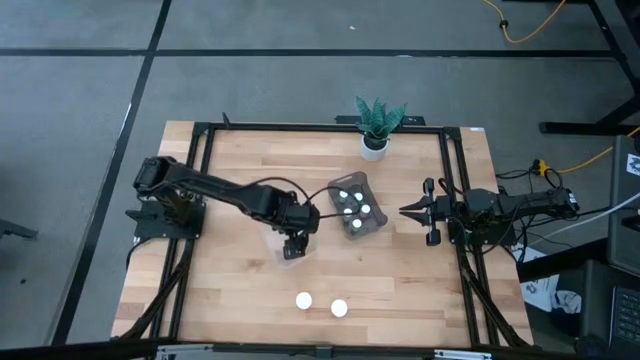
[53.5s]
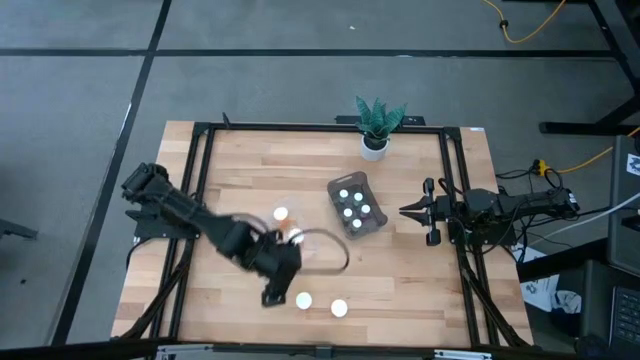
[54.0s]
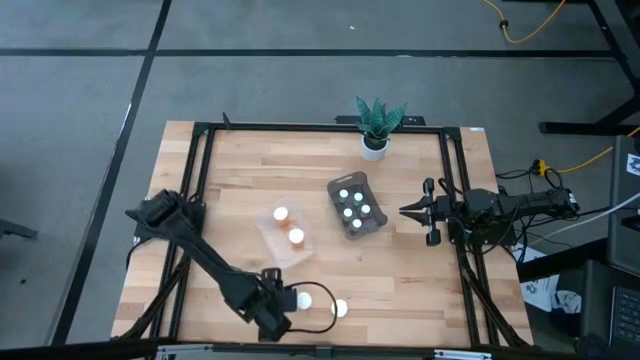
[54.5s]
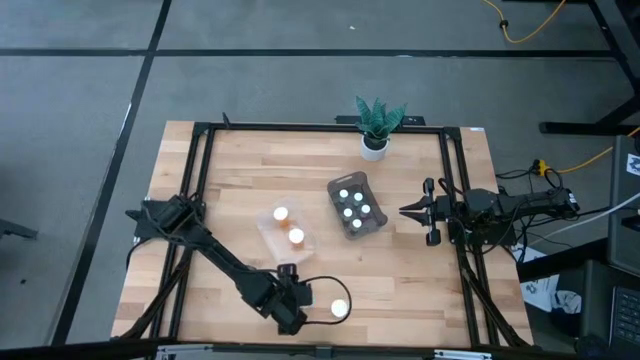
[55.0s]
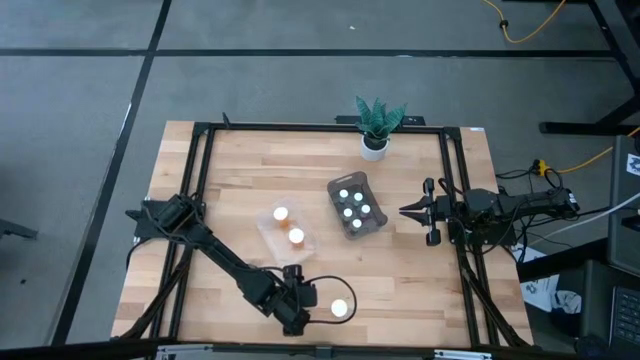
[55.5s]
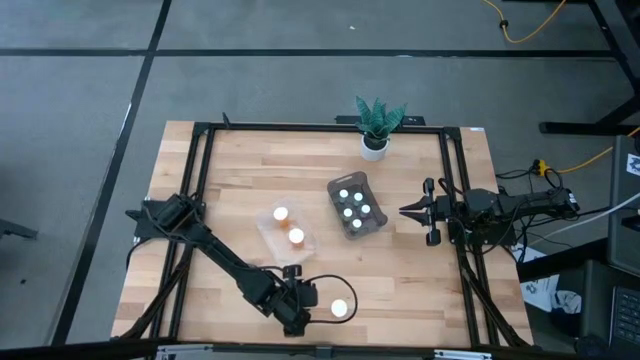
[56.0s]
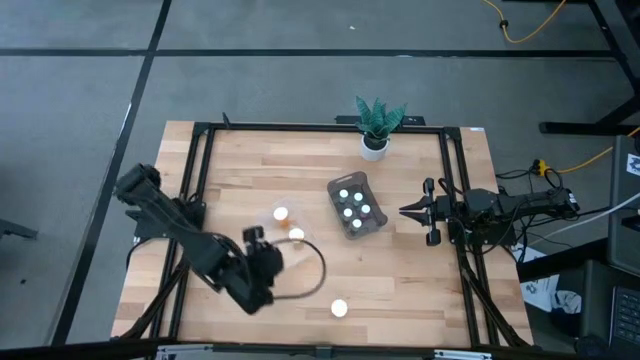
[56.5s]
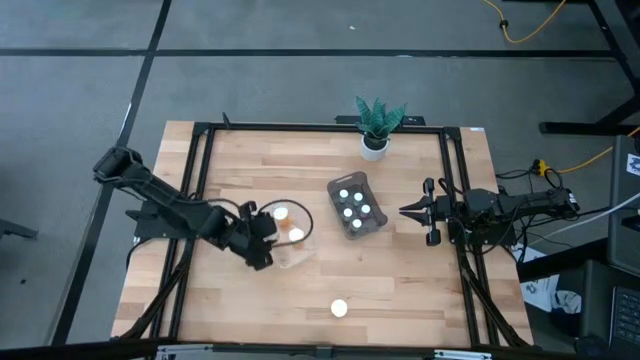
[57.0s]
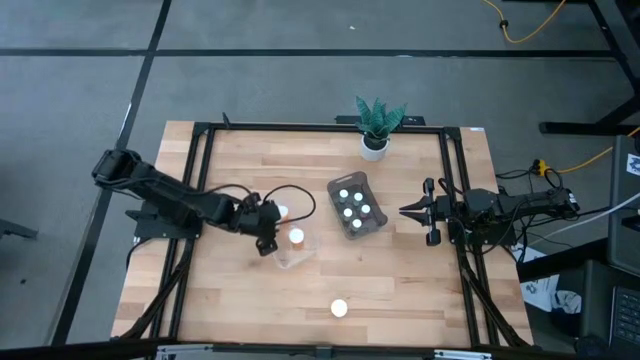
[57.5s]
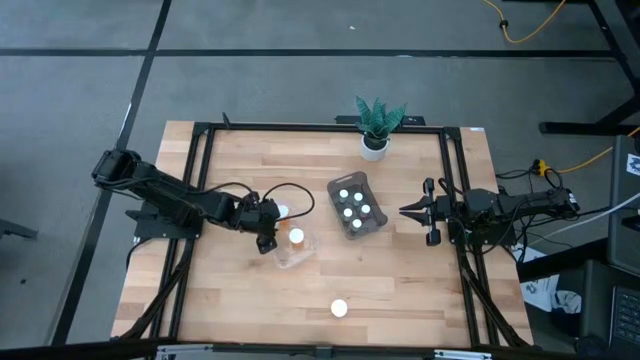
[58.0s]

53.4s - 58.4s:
Task: Pick and place medicine bottles into bin by pill shape (circle, oval)
Put the large orange pill bottle into the transparent bin

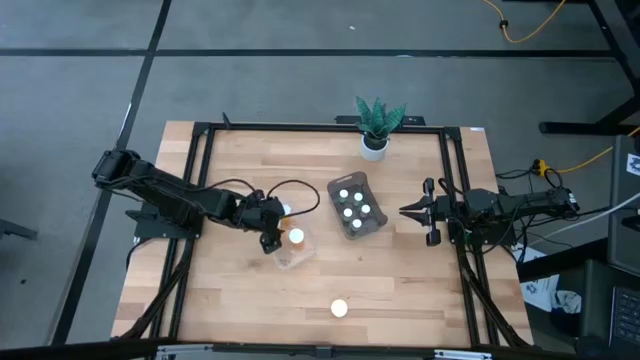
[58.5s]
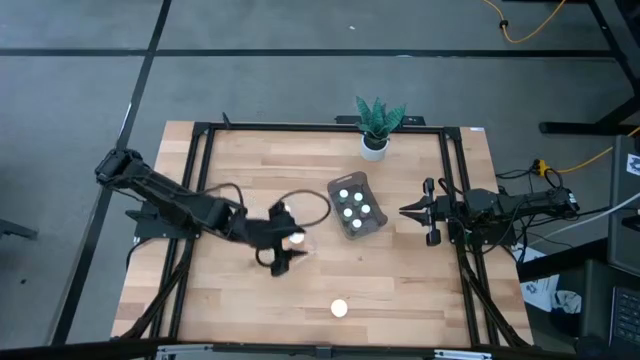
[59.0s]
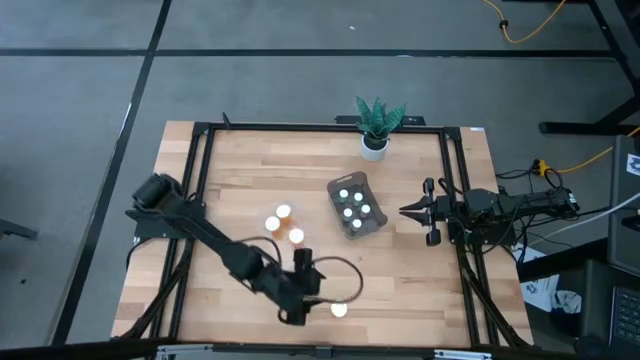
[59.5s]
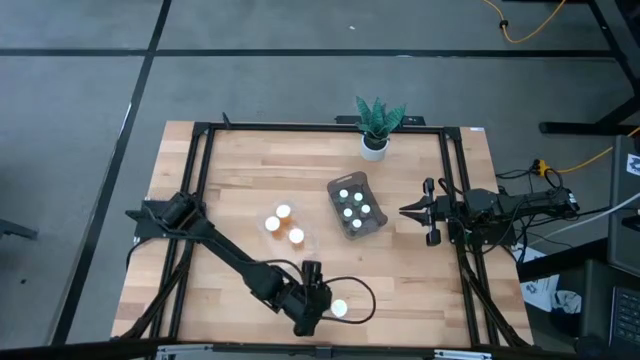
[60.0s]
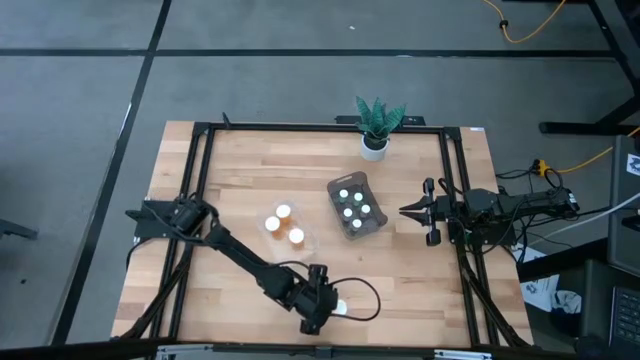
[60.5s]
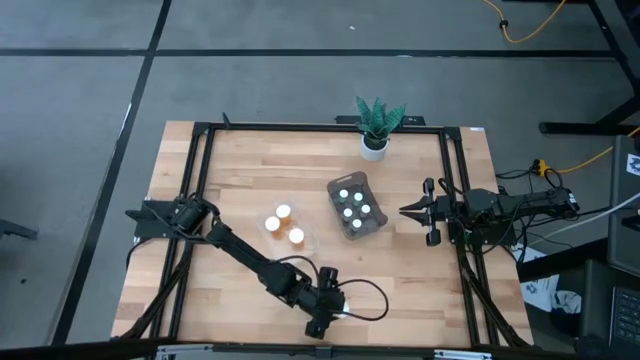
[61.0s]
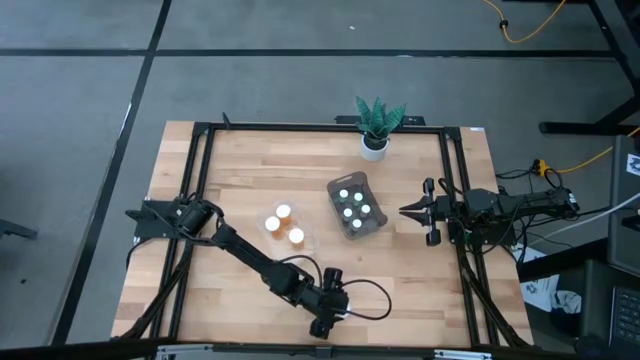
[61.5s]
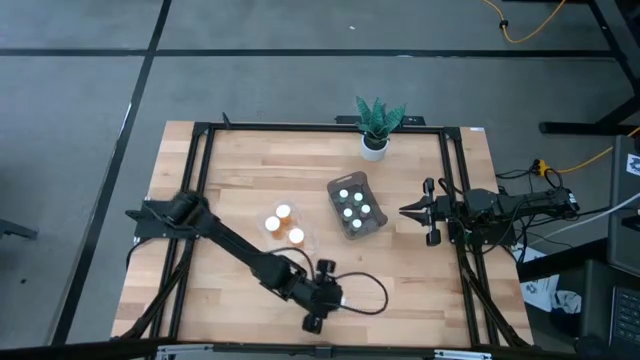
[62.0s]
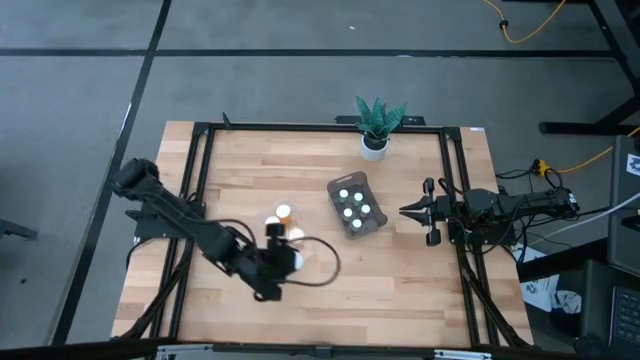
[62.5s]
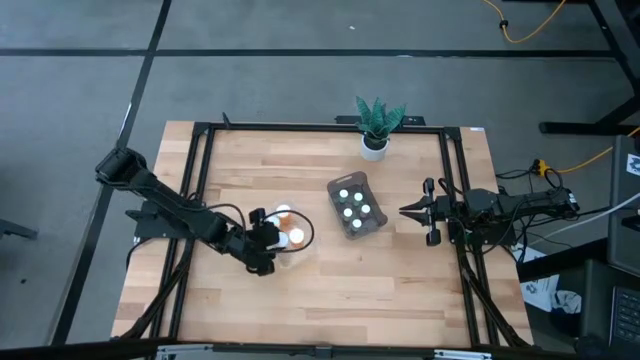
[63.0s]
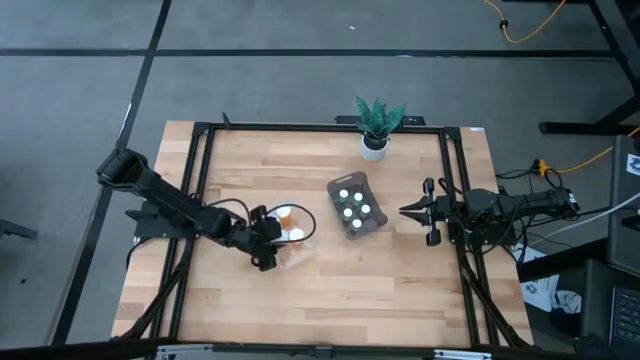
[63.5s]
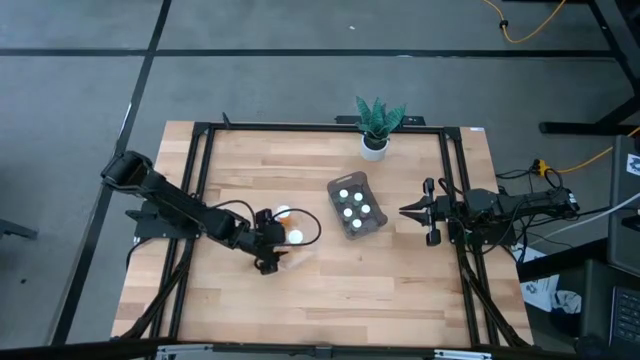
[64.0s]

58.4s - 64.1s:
Put the large orange pill bottle into the transparent bin

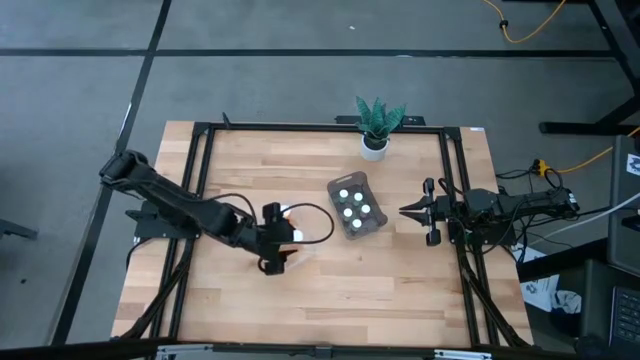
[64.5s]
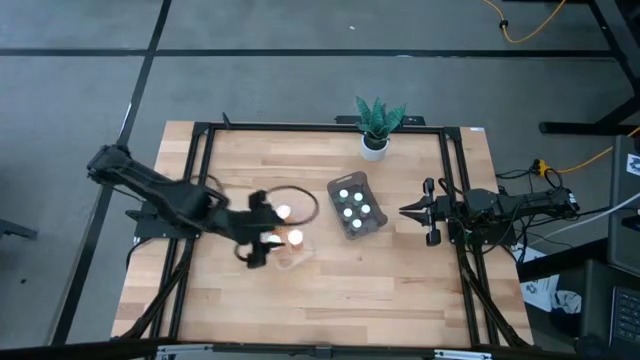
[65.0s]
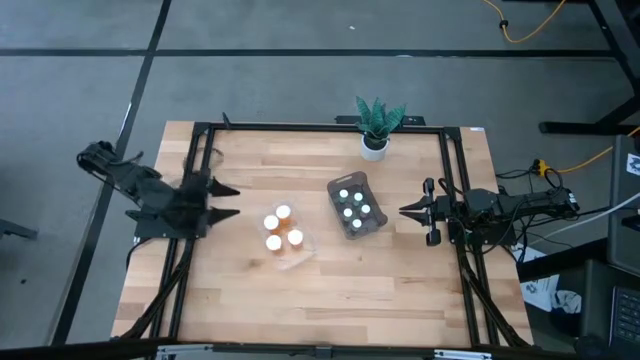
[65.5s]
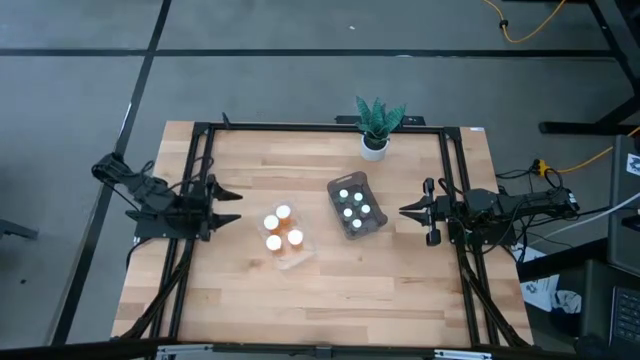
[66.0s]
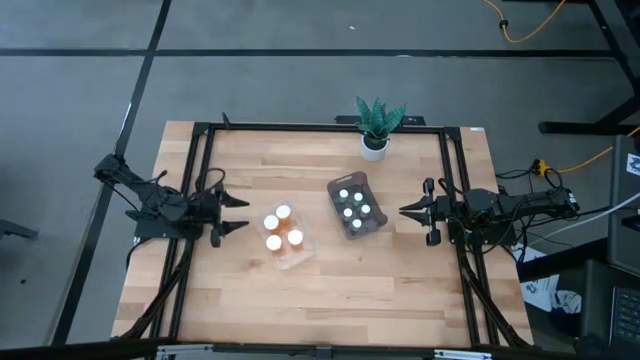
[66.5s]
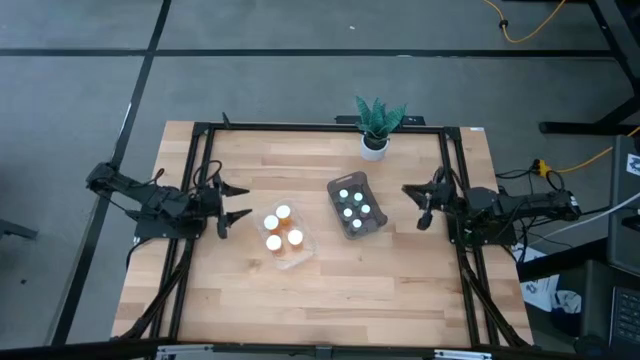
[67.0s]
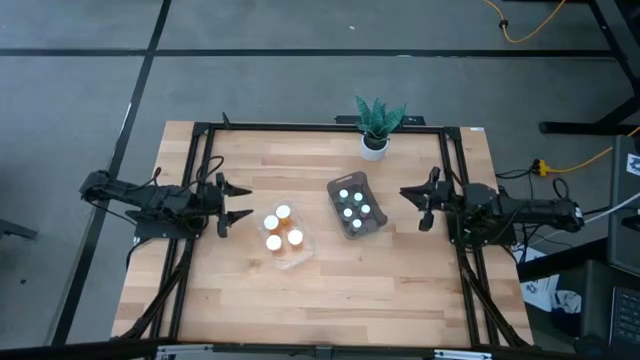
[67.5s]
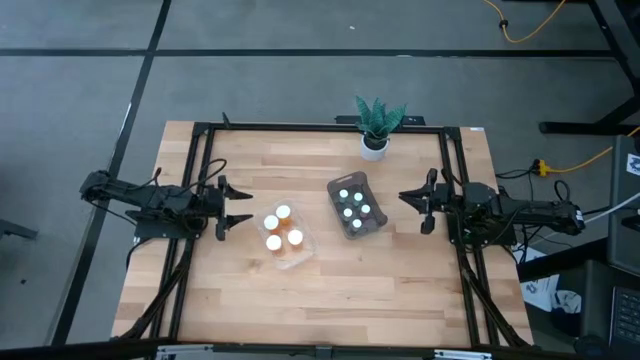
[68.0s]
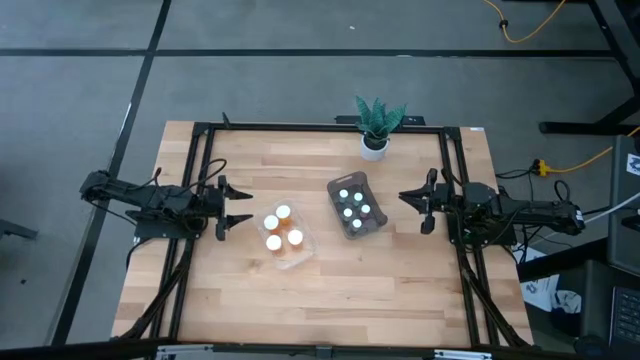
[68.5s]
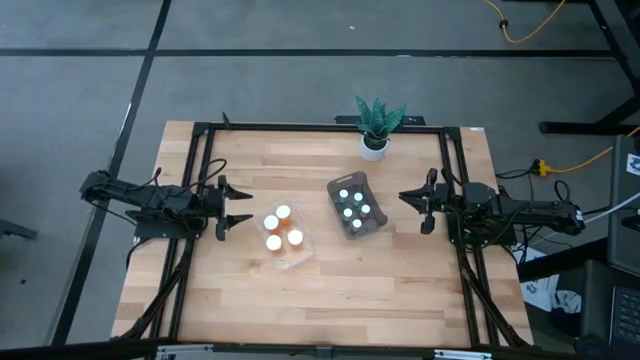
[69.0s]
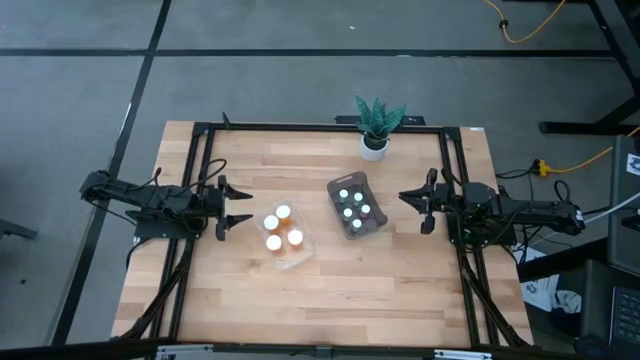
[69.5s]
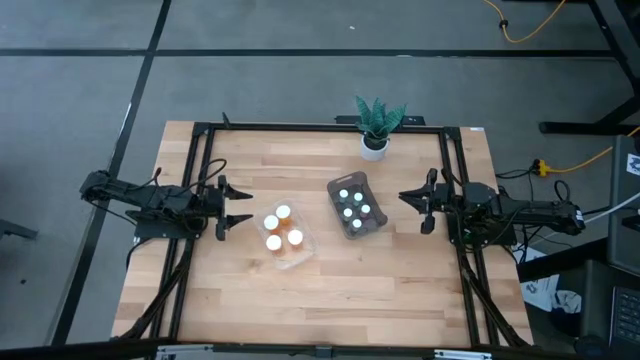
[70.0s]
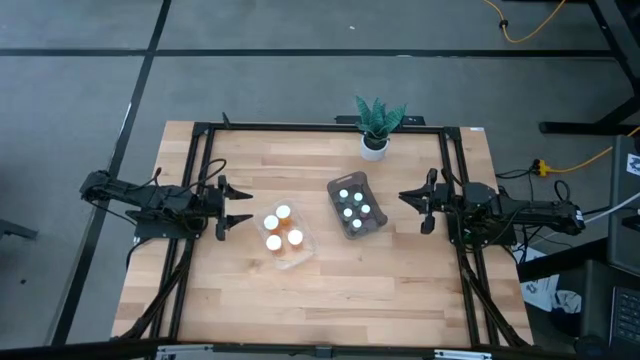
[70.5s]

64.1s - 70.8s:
Return to Home Position

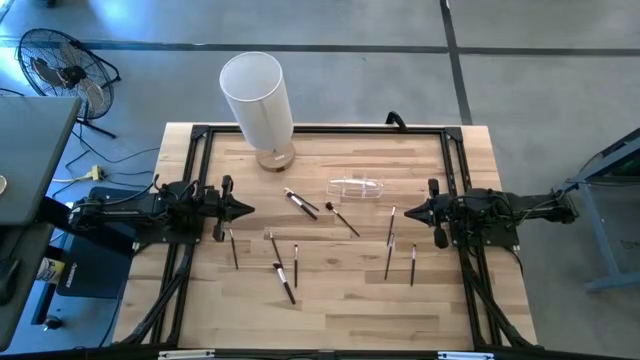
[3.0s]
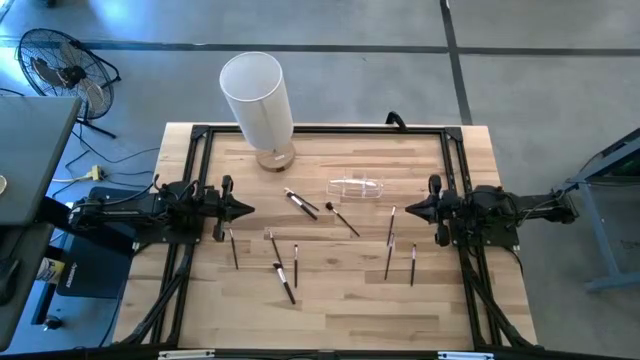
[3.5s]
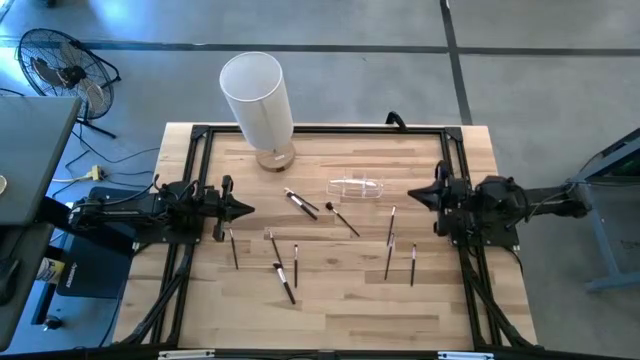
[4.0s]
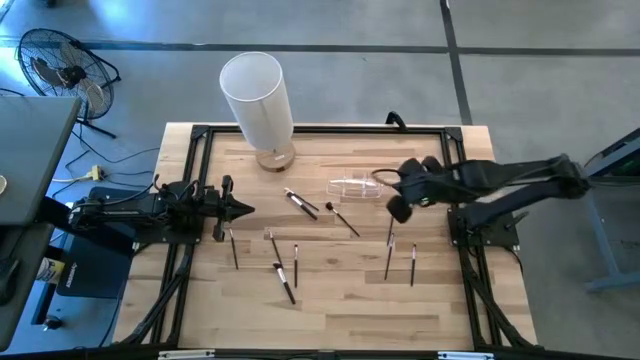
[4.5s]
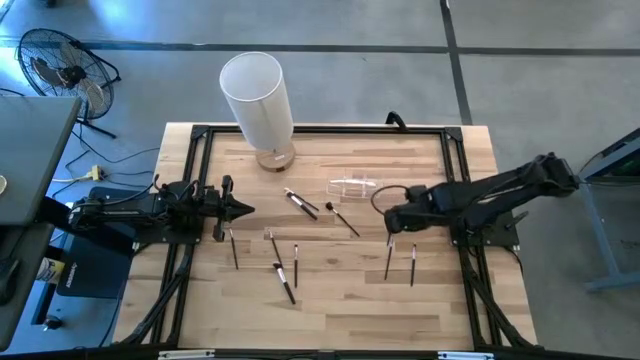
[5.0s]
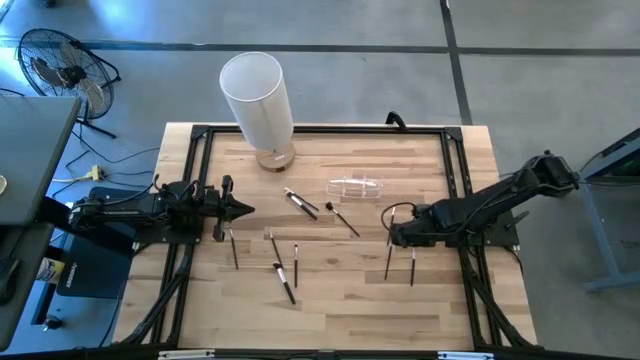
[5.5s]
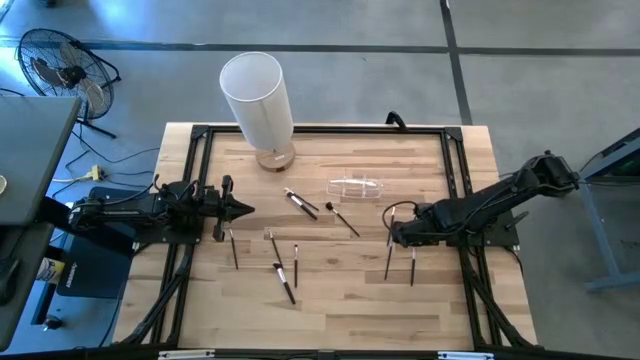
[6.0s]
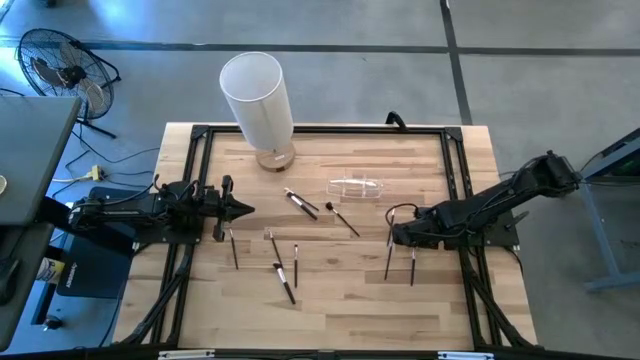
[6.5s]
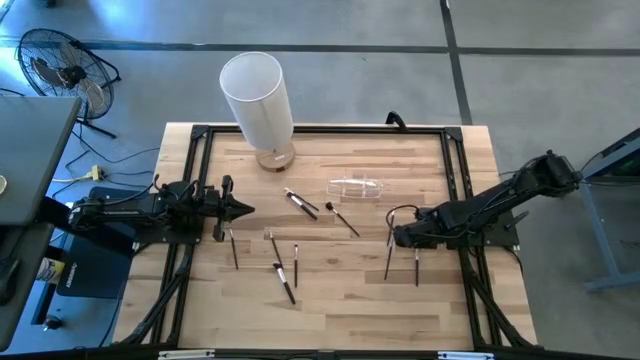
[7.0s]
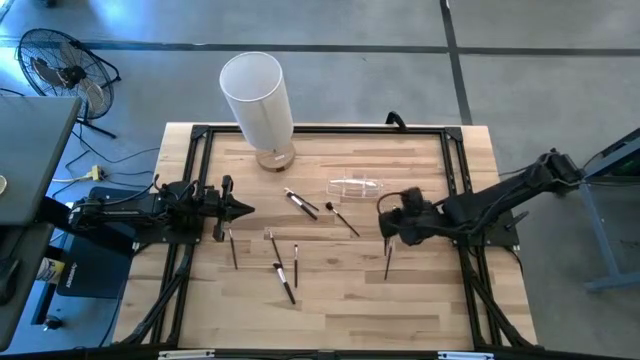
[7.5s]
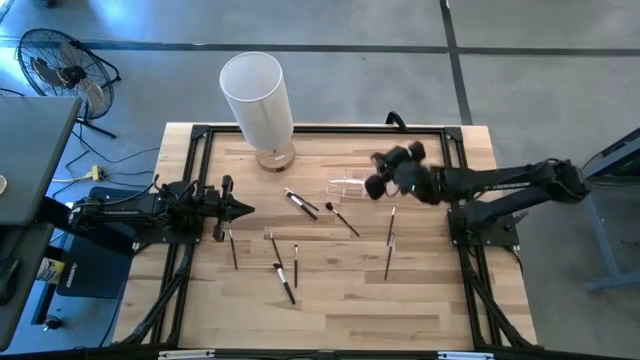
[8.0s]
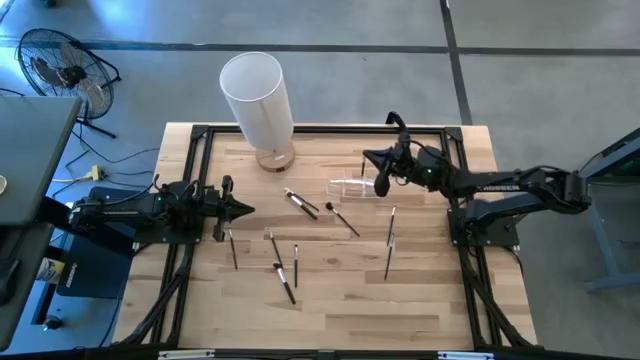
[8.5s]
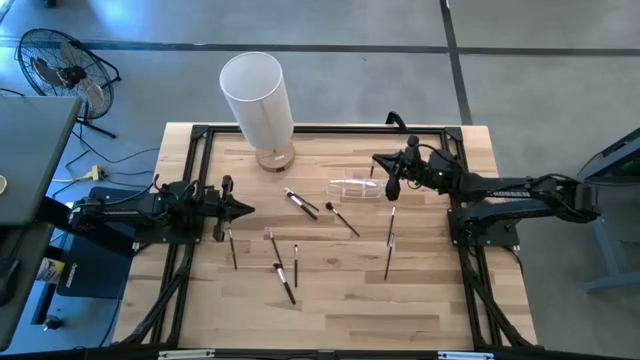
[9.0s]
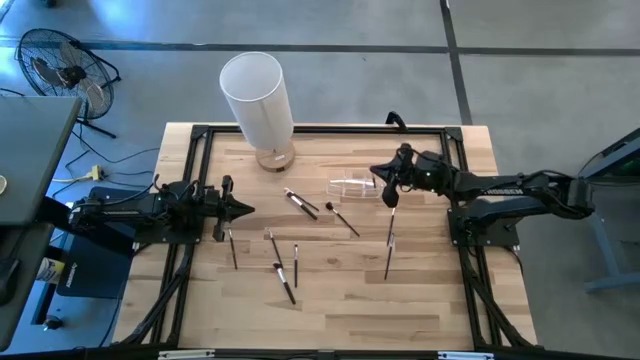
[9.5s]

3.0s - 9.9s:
Task: Put items in baskets/containers
Put the black eyeshadow brush into the transparent organizer
